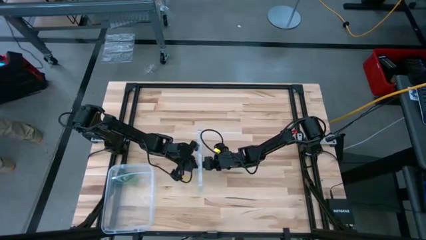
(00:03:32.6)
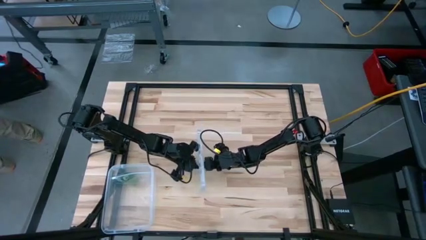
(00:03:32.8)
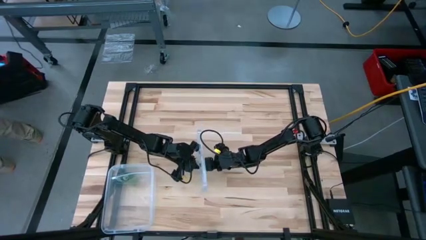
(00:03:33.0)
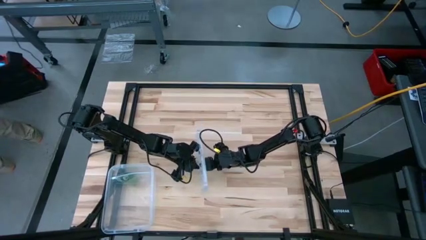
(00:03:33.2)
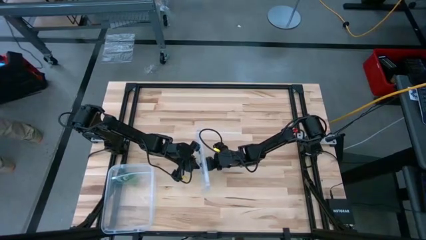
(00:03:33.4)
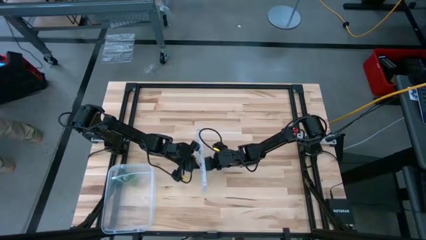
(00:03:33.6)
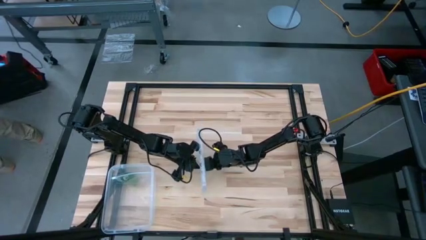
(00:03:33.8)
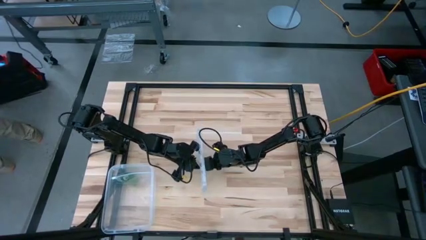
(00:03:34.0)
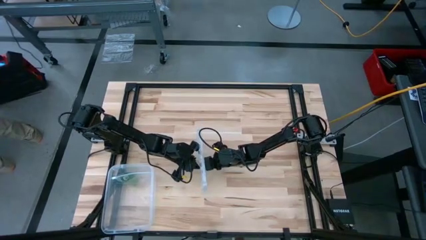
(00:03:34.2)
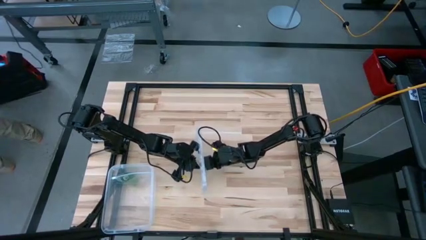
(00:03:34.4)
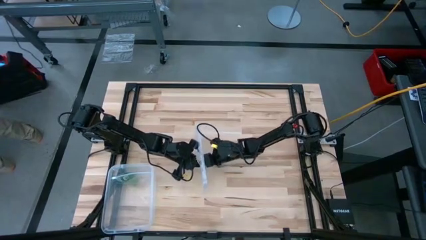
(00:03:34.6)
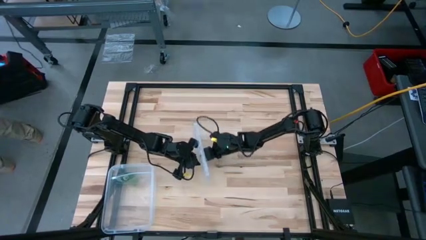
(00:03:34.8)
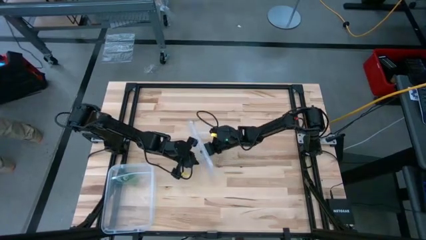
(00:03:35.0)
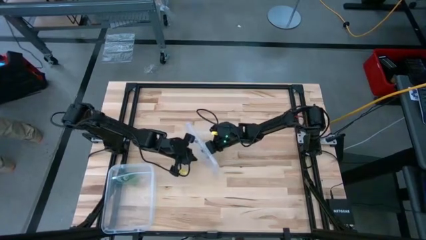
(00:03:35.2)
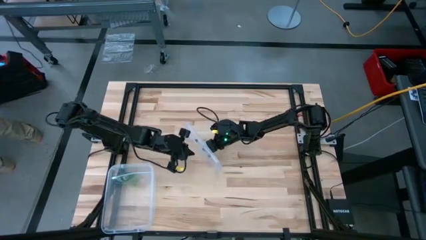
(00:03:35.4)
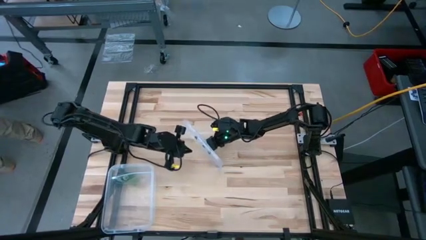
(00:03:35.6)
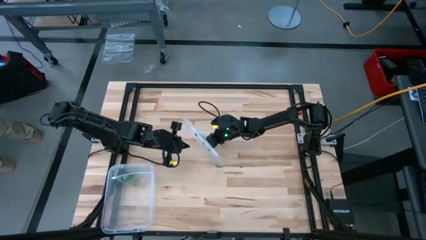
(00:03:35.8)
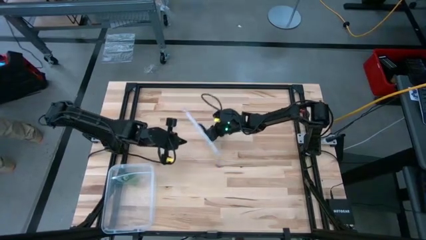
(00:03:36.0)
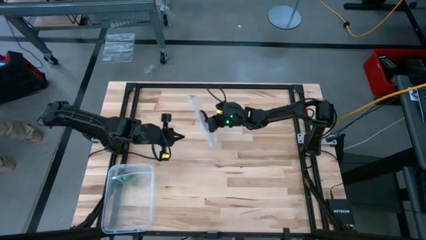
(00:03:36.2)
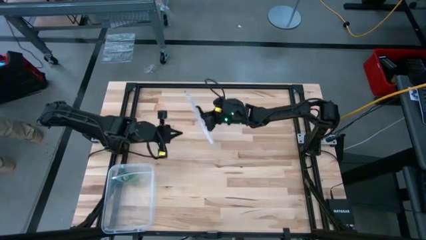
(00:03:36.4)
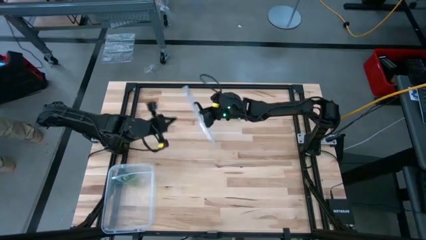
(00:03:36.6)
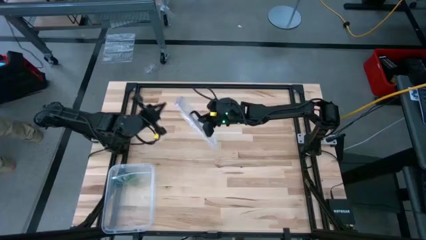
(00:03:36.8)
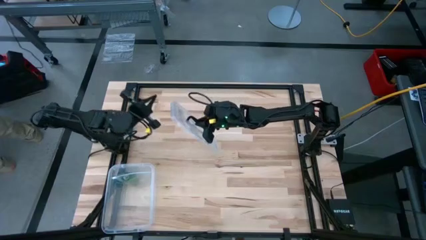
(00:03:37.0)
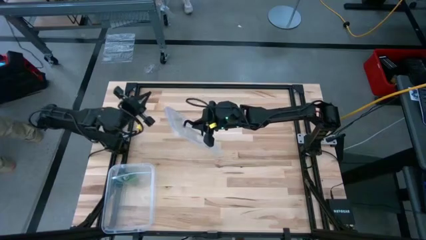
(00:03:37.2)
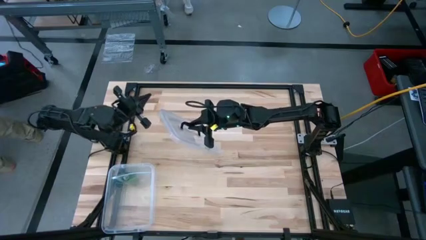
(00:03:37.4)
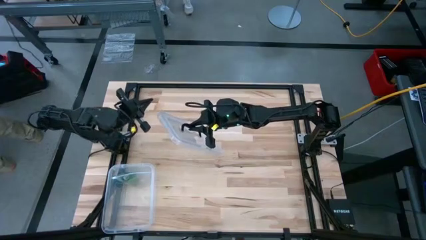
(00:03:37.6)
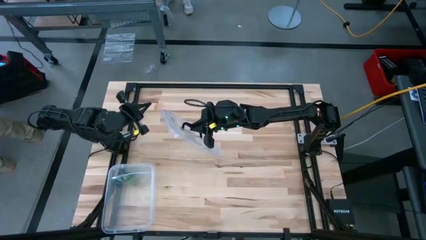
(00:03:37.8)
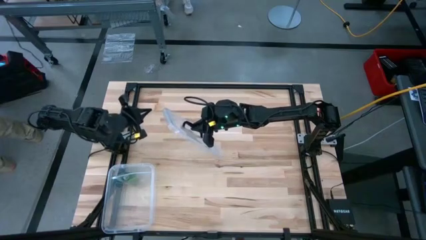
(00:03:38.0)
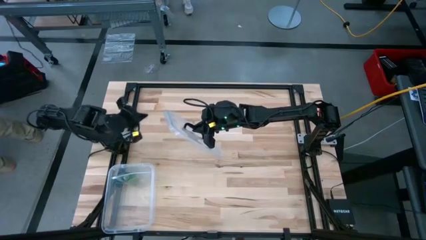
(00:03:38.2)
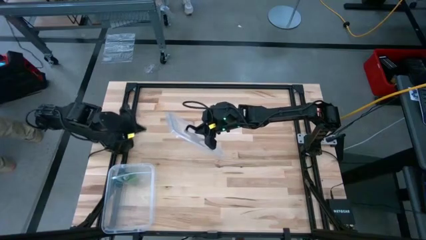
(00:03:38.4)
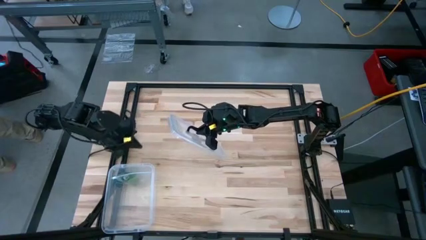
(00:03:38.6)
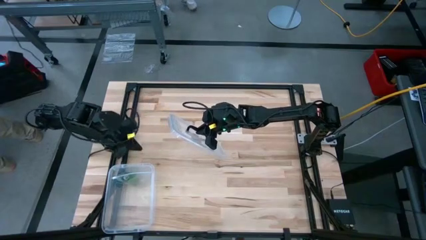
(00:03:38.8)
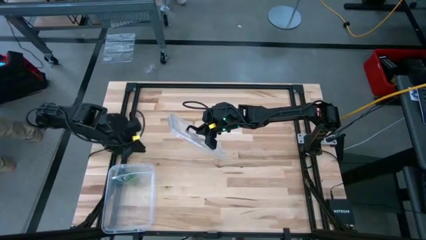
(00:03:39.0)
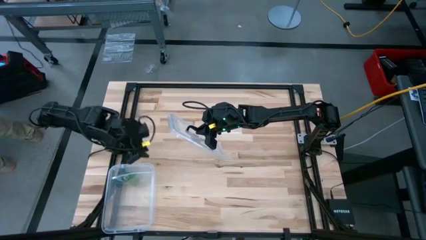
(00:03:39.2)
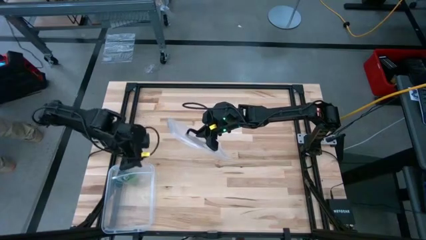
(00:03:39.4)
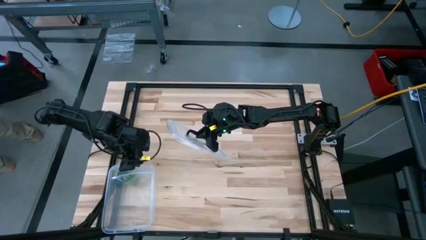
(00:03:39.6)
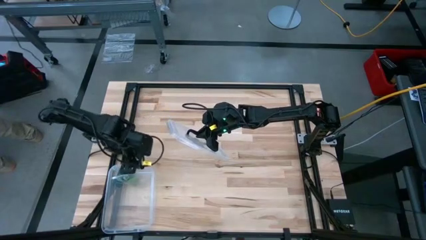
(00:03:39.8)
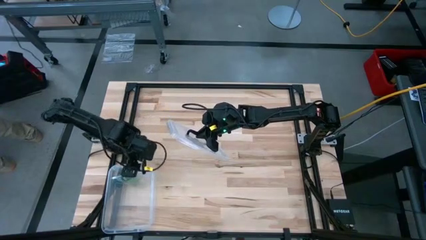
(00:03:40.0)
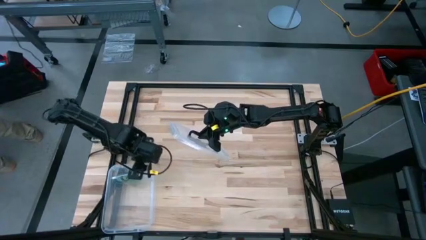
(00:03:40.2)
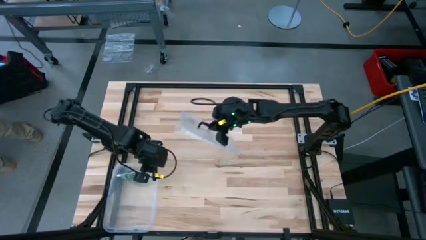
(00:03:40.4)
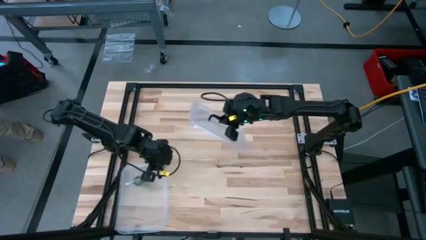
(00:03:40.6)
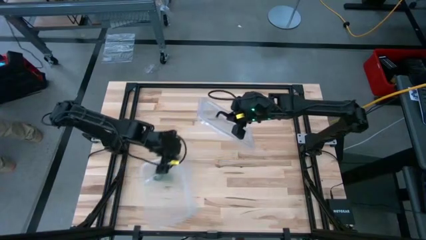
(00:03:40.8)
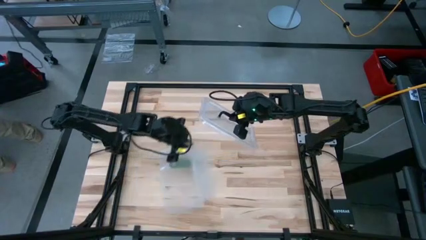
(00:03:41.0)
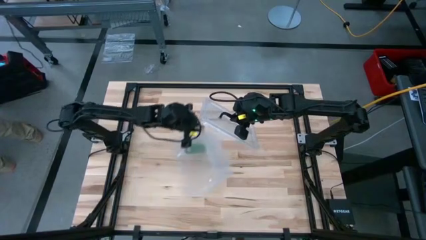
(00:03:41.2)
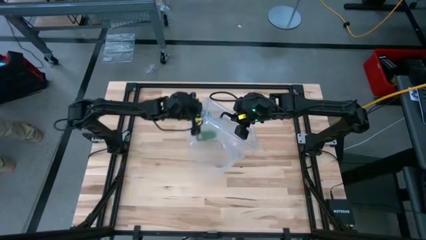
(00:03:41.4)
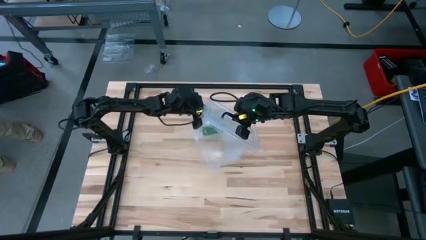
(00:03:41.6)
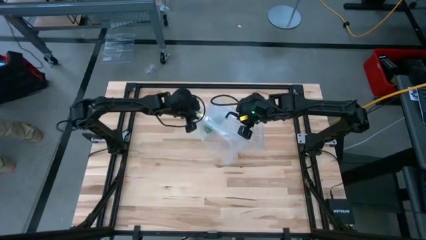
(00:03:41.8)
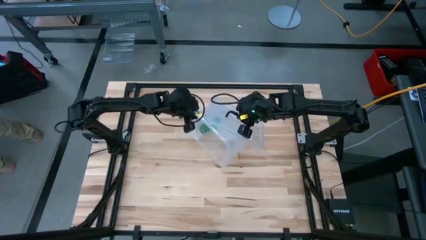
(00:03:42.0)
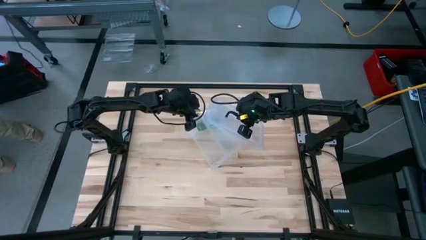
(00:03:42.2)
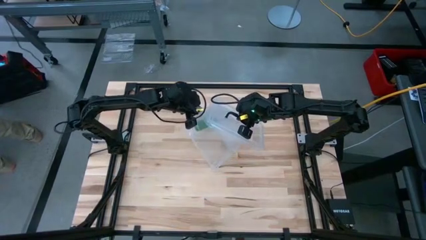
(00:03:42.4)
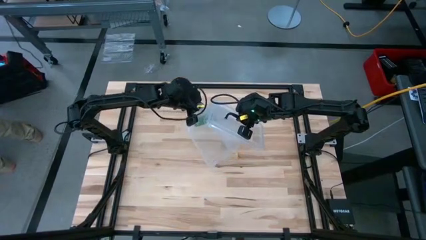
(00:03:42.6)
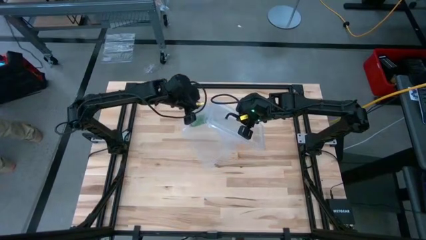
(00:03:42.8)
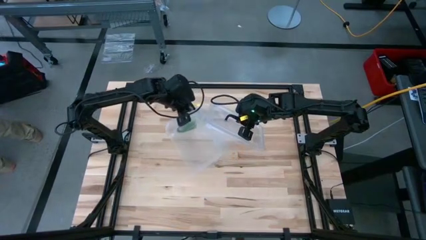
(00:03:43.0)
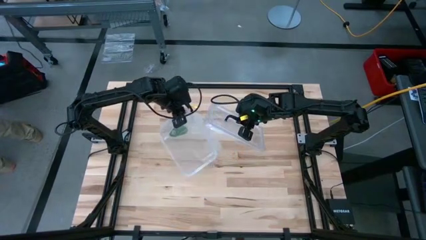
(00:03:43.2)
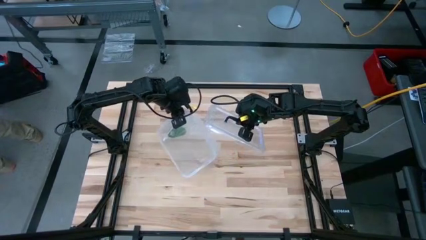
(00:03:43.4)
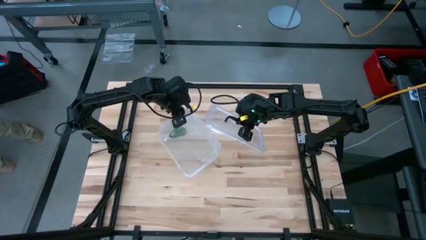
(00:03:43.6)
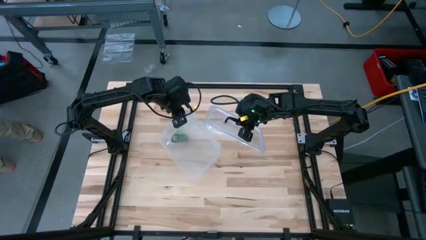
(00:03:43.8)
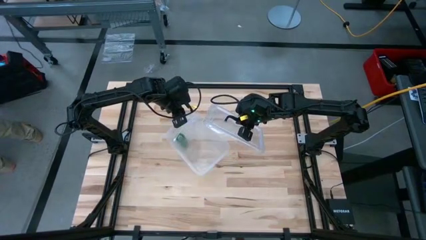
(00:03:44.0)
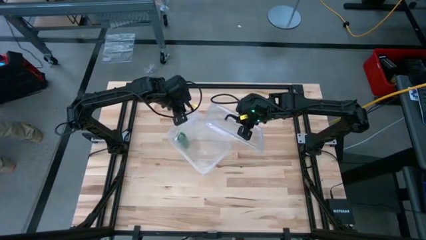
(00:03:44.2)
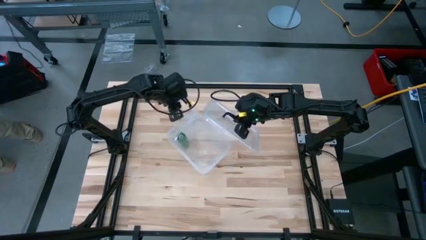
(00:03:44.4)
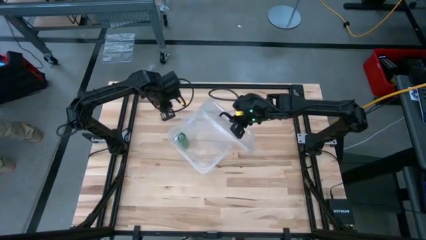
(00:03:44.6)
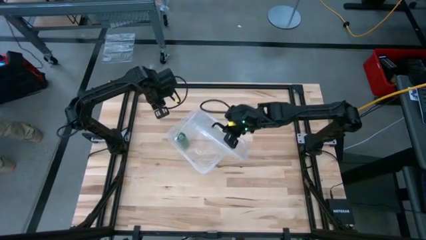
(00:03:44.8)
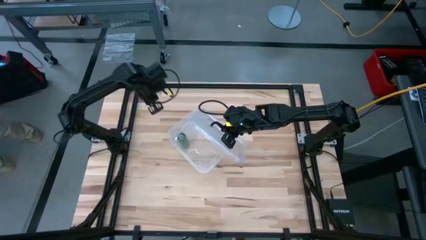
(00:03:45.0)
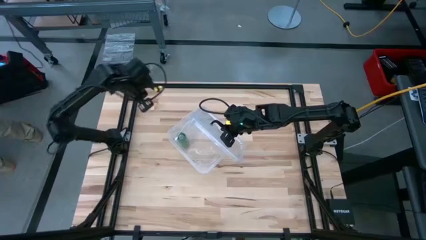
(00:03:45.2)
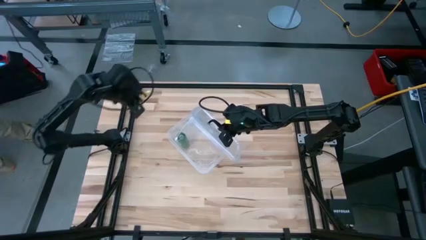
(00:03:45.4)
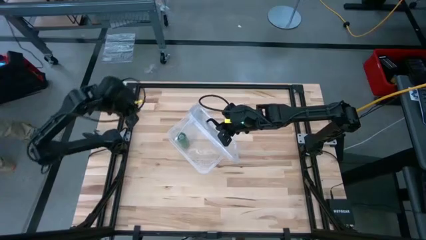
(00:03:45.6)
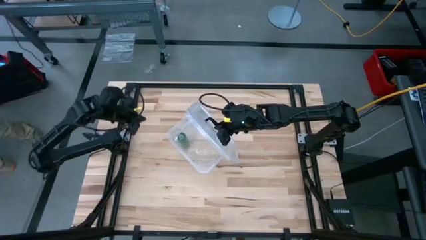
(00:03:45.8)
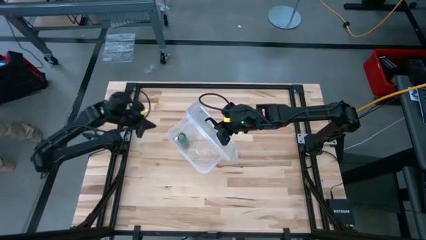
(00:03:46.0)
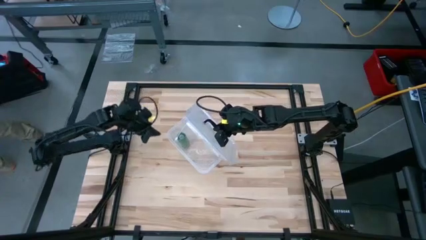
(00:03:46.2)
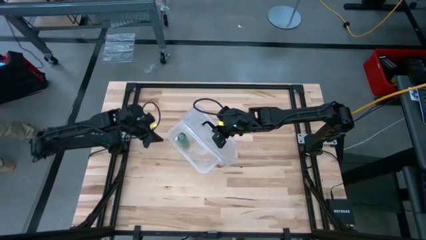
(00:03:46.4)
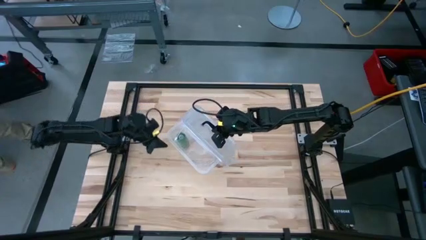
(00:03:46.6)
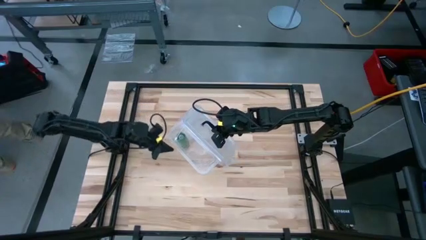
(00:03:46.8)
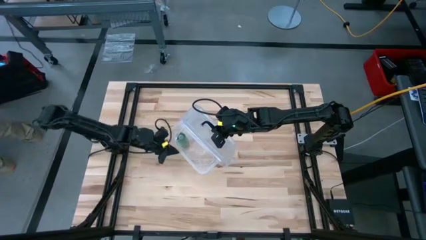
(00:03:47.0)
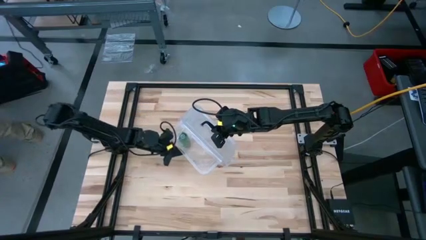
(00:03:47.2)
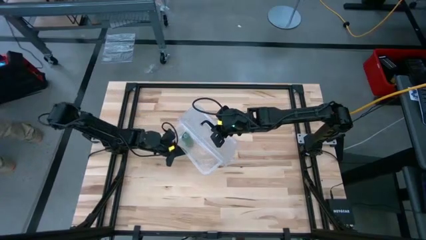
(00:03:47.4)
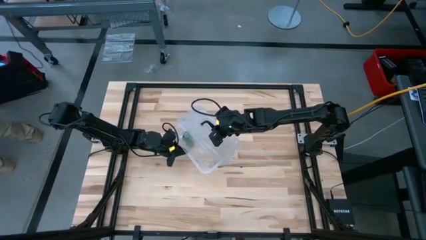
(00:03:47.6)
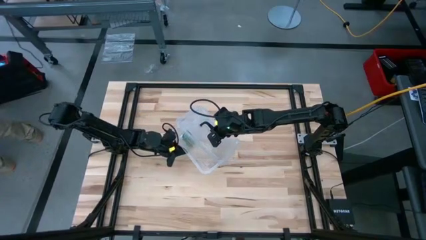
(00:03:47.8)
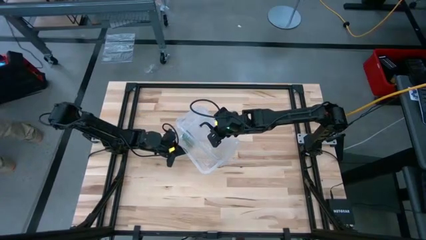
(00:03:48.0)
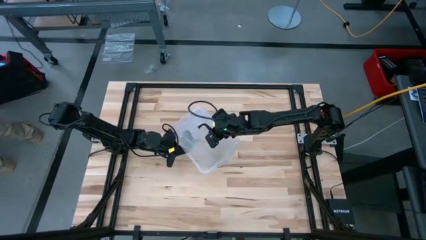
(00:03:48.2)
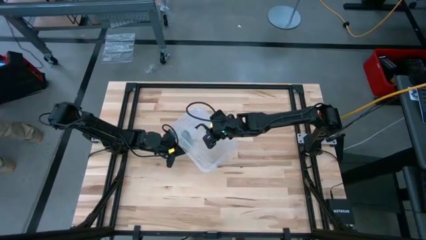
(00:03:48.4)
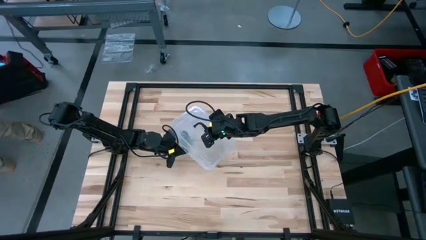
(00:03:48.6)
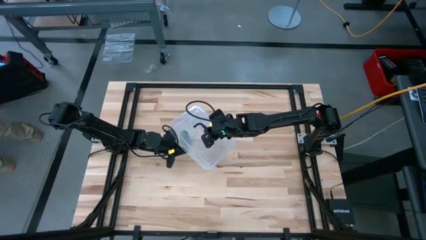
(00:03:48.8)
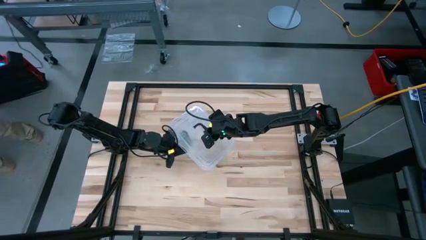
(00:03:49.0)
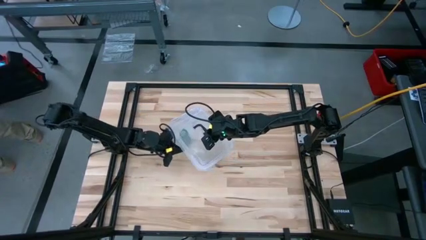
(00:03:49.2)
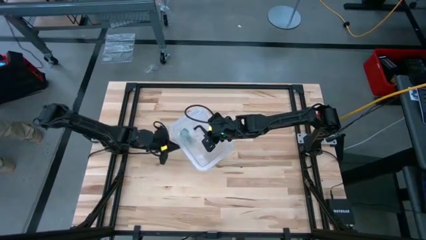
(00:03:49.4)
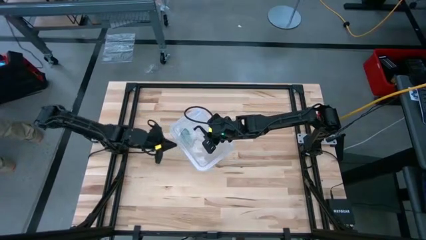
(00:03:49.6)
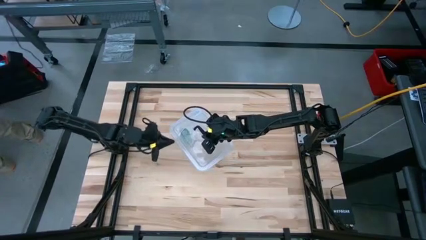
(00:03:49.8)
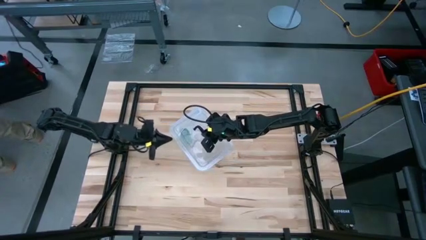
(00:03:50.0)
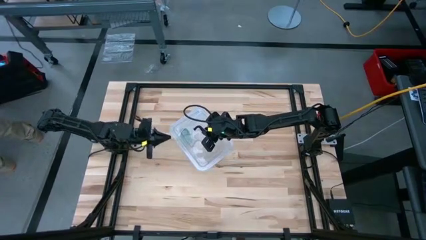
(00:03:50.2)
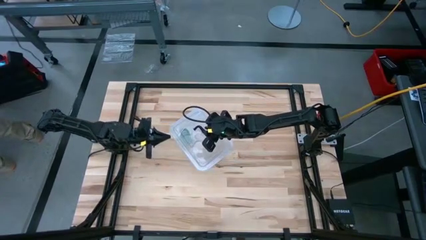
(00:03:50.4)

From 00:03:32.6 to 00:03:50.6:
Task: Roll bandage
Put the transparent lid on the transparent bin
